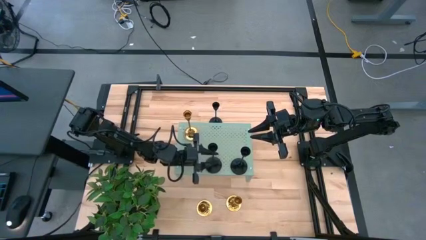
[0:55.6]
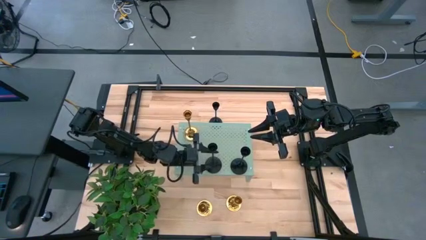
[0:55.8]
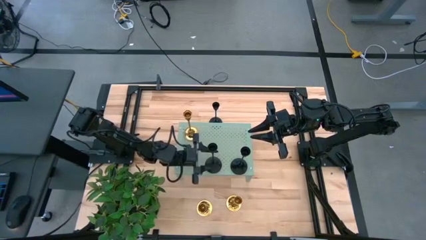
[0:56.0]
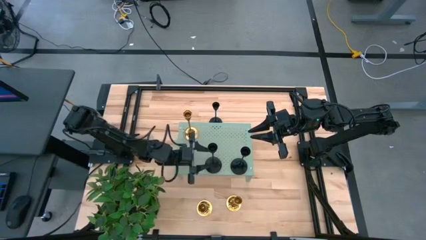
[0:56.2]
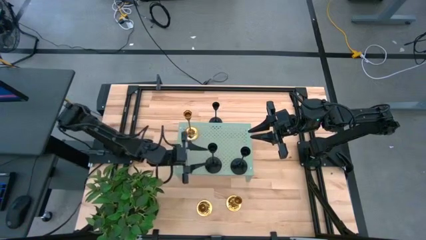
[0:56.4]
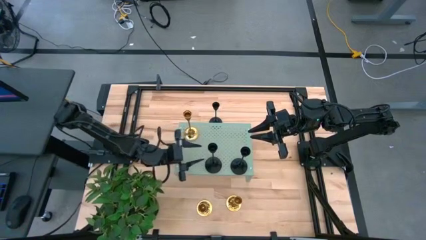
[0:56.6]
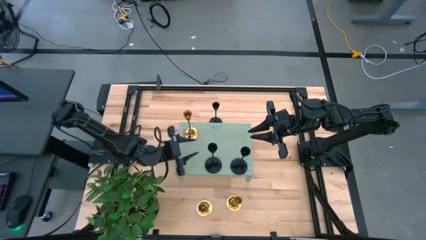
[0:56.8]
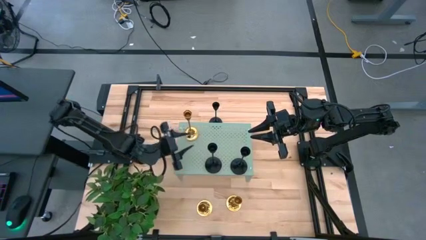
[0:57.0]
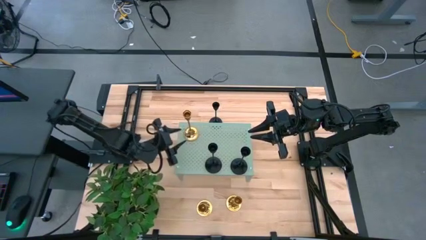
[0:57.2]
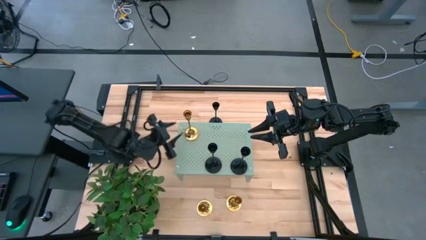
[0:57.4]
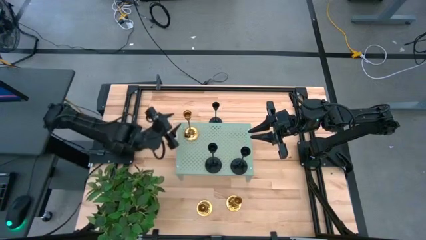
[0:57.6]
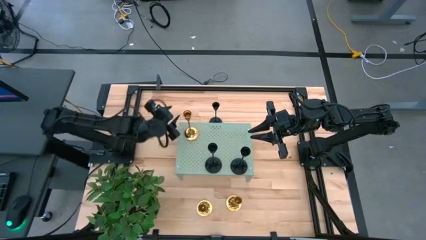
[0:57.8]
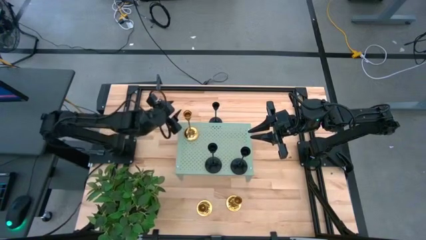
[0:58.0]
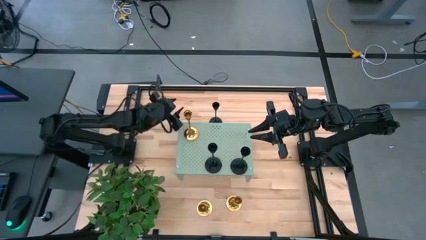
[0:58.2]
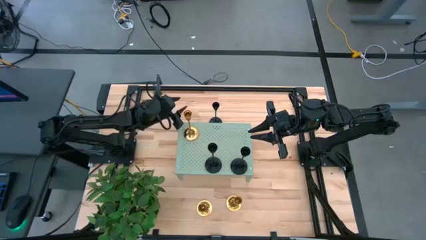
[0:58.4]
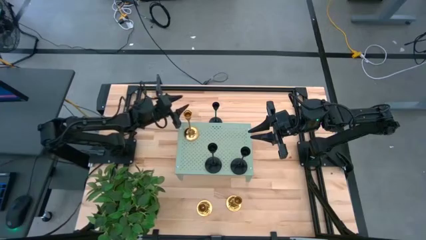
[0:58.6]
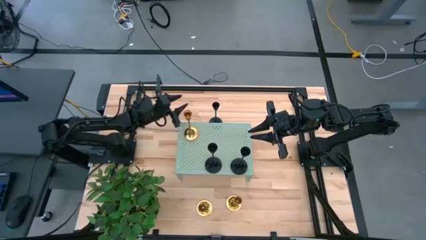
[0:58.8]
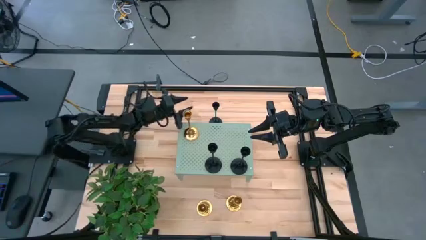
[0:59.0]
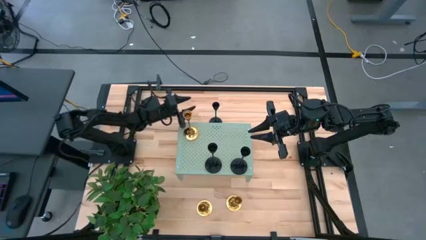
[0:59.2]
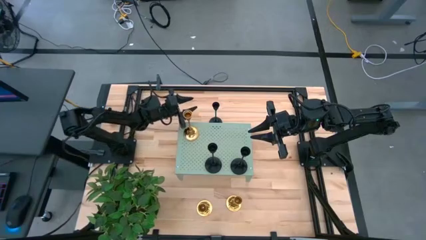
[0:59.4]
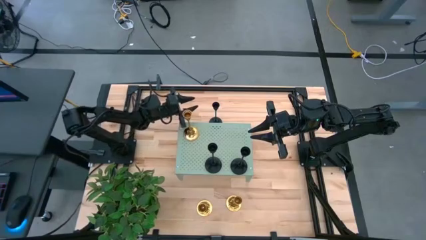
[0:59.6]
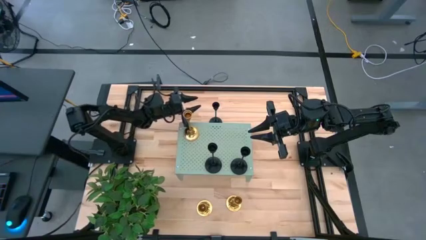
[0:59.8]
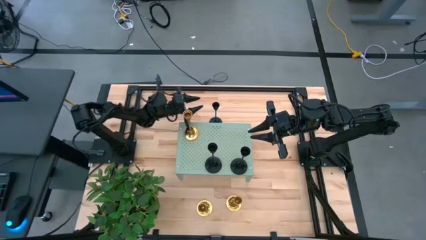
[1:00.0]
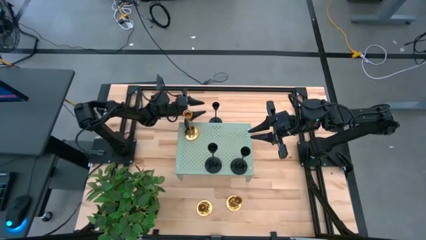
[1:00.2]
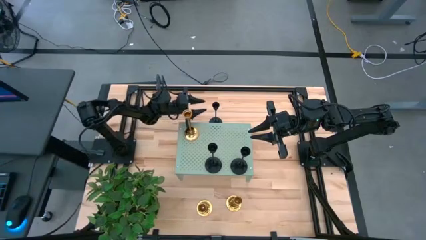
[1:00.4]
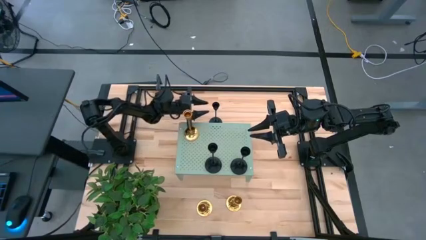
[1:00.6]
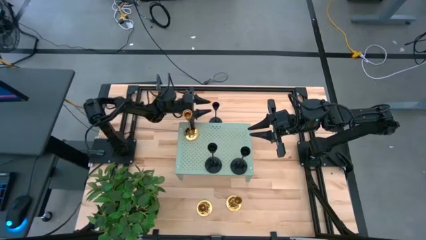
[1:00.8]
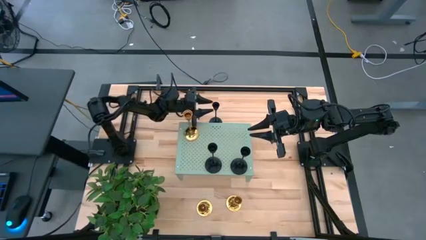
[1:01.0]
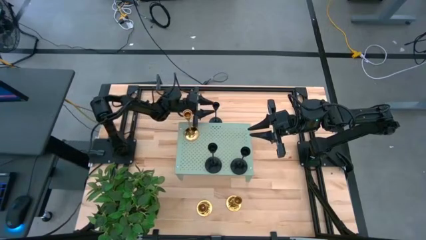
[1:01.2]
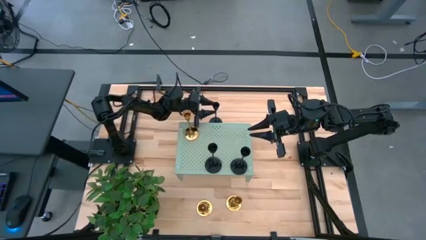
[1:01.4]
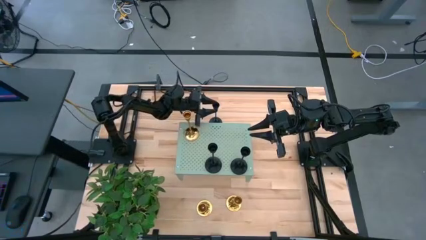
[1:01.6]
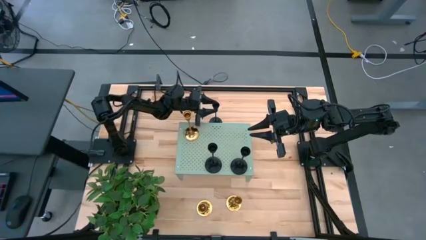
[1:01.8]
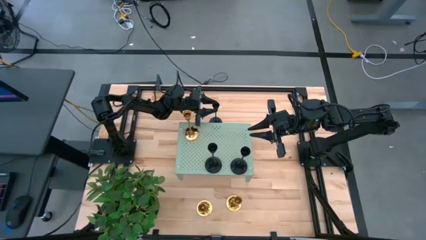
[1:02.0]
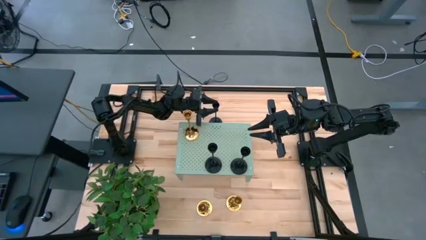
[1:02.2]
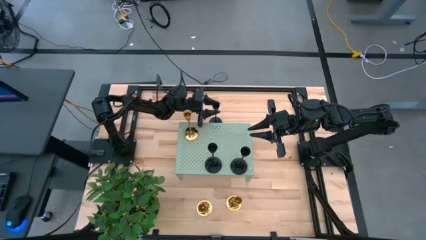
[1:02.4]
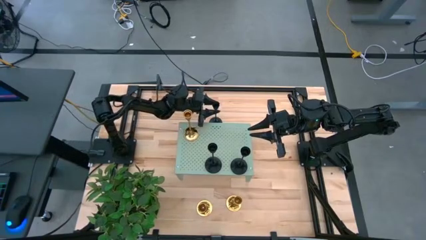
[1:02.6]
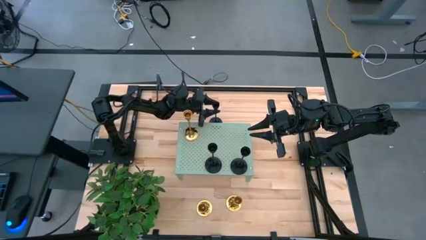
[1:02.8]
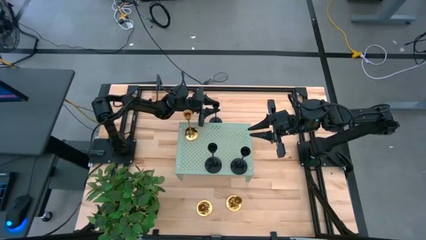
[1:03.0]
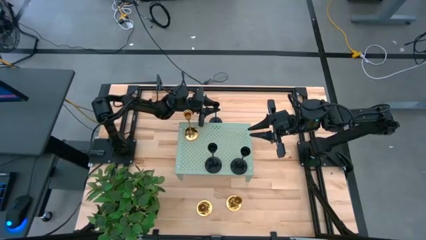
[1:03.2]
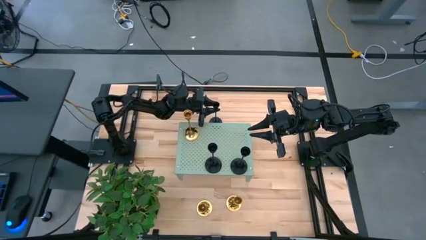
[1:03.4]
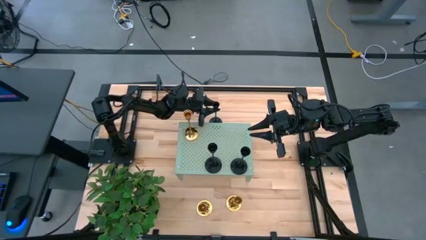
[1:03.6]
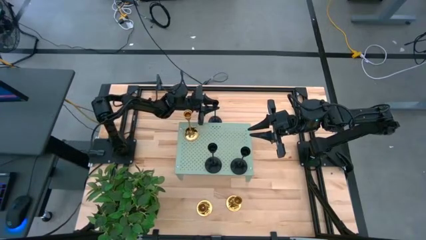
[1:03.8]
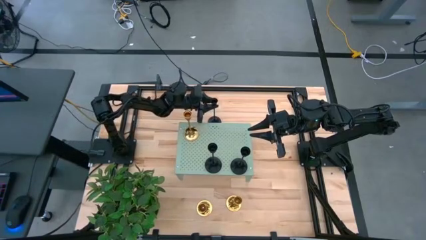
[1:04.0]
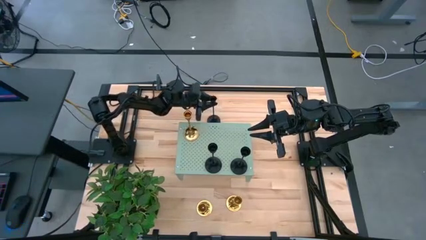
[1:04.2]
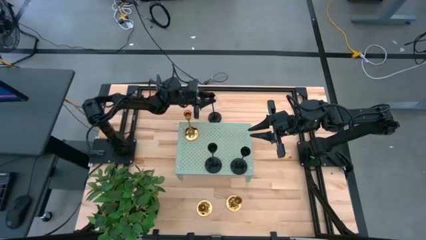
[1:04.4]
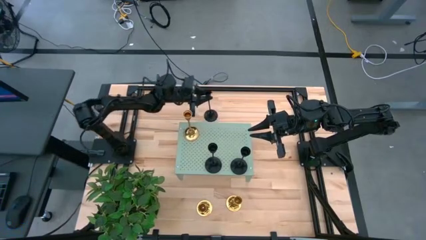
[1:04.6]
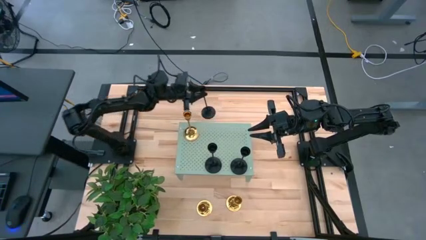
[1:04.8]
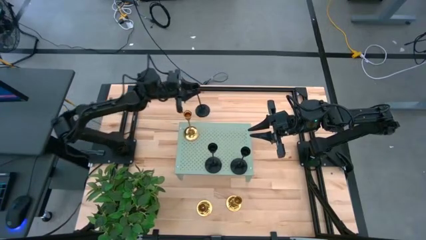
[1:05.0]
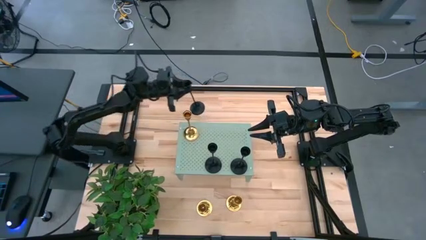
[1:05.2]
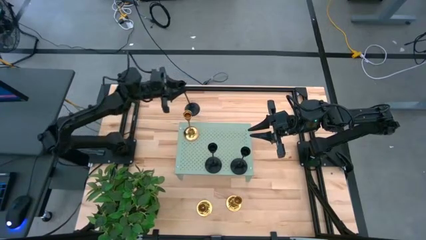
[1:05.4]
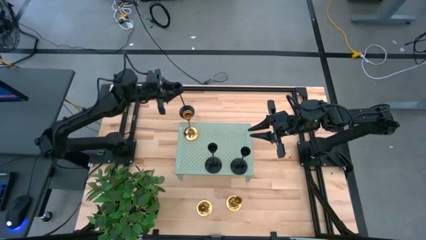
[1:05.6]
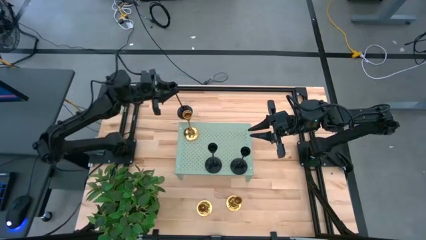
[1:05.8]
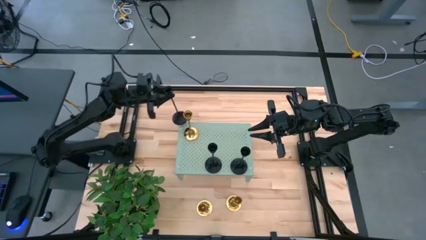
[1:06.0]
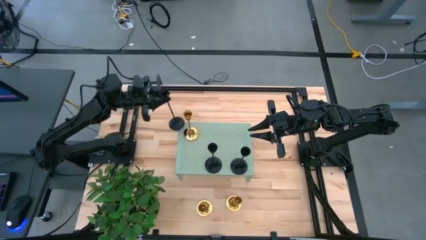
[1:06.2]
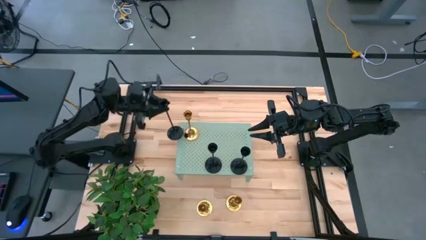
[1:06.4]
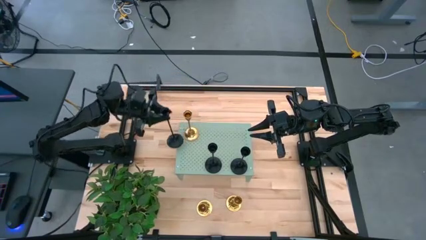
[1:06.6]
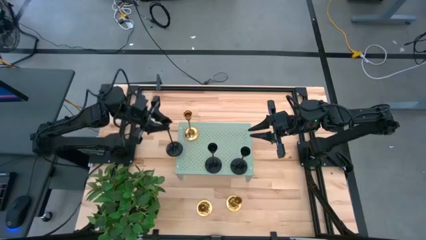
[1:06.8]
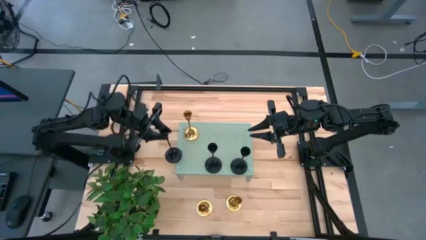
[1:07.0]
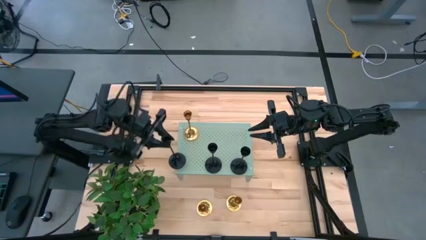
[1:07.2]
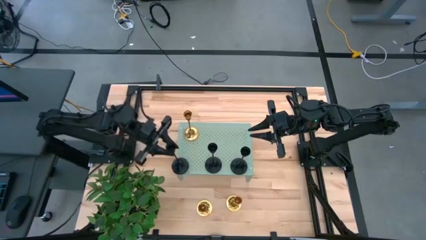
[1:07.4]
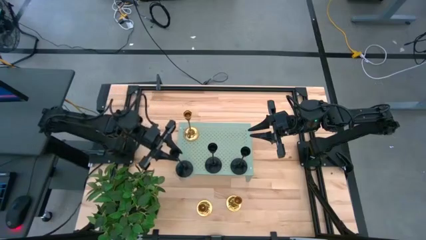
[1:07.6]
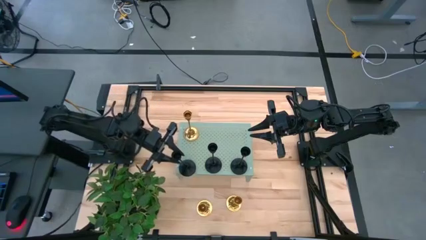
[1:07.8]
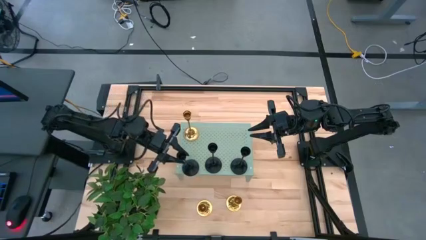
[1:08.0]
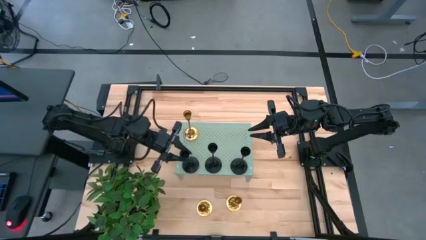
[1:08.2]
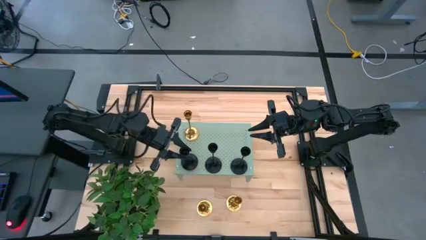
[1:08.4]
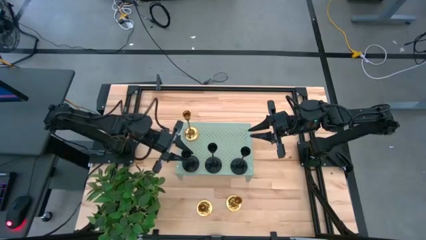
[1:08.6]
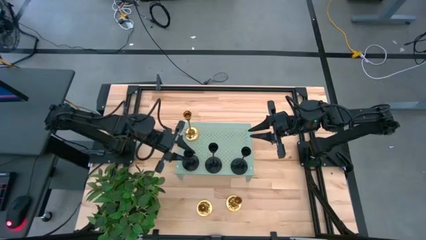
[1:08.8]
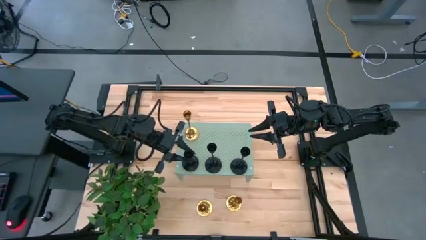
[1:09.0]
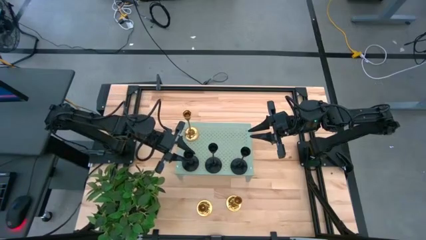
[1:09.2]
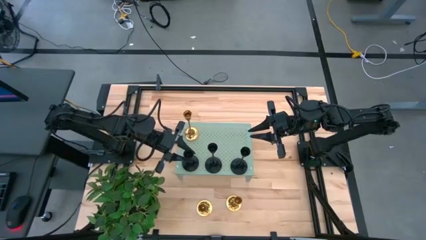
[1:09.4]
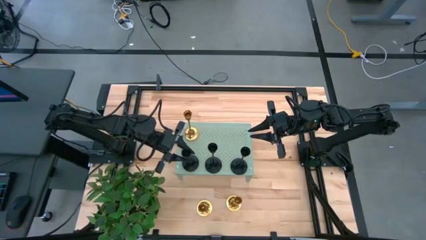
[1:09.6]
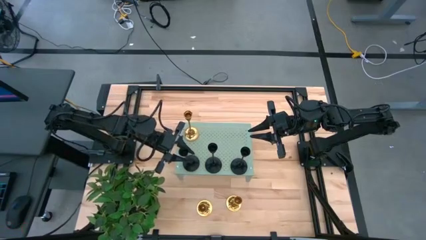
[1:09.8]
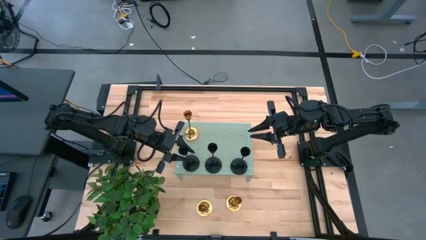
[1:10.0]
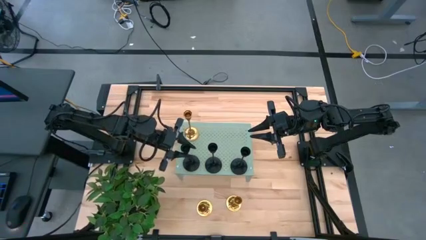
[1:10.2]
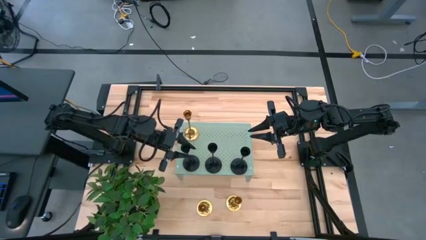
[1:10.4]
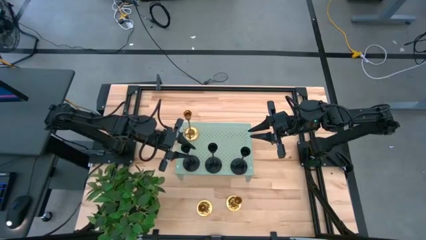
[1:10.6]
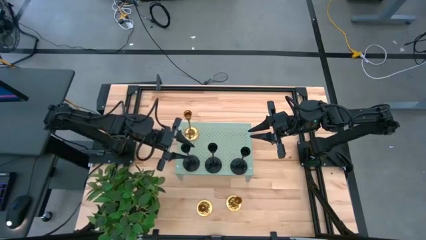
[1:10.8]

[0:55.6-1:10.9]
Task: Pick & Place candle stick holders
Put the black candle holder aligned with the golden candle holder on the shelf
